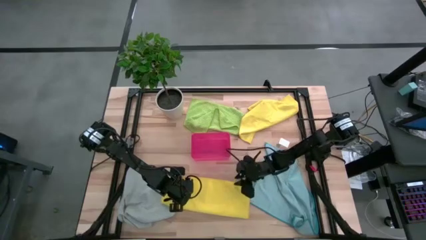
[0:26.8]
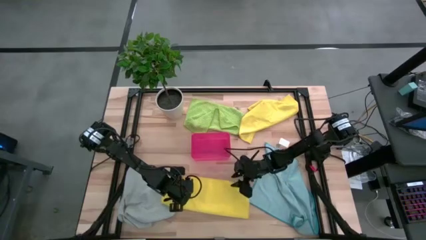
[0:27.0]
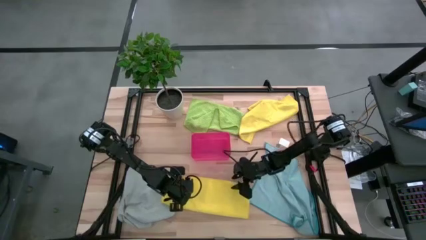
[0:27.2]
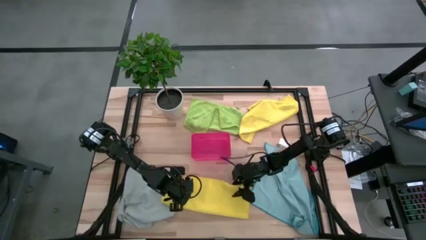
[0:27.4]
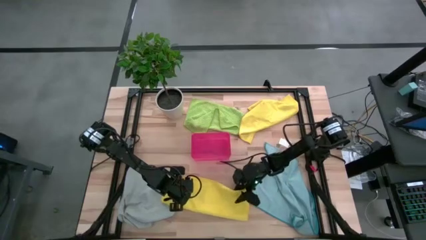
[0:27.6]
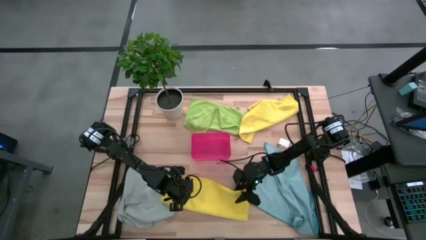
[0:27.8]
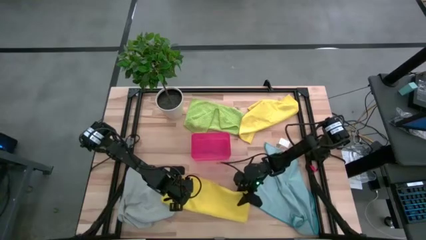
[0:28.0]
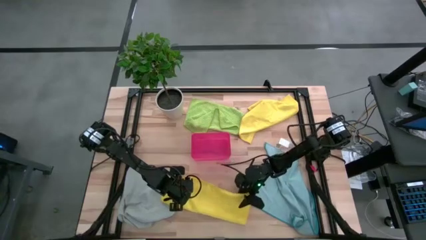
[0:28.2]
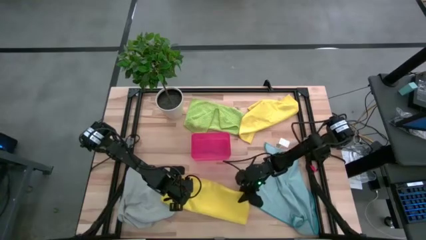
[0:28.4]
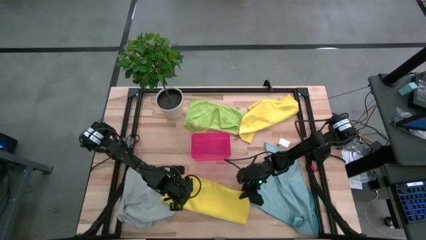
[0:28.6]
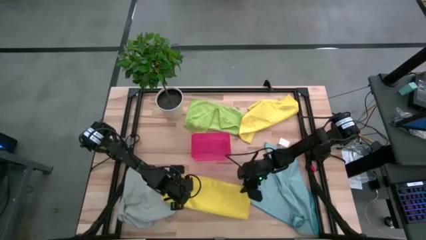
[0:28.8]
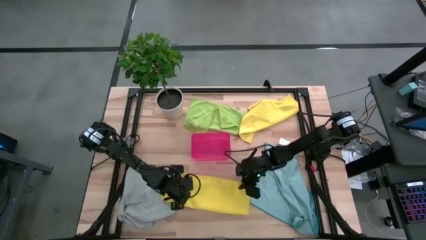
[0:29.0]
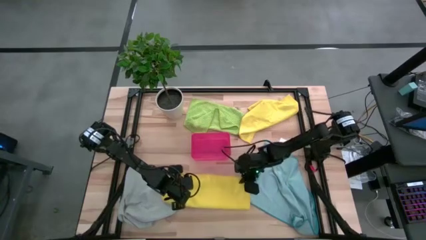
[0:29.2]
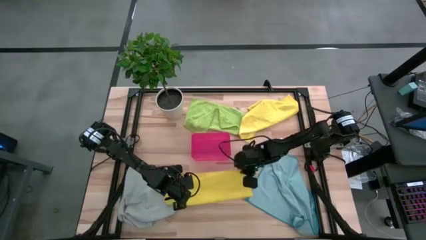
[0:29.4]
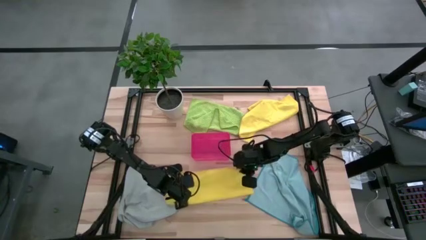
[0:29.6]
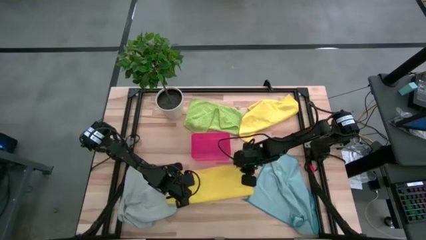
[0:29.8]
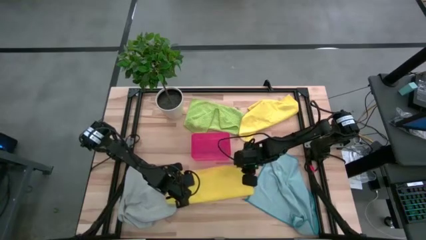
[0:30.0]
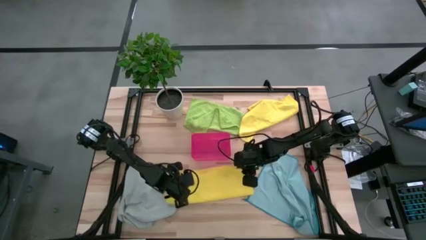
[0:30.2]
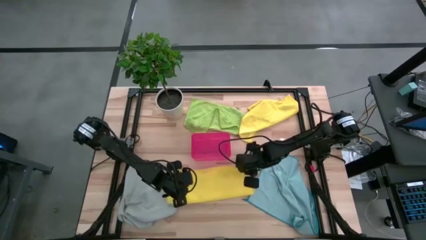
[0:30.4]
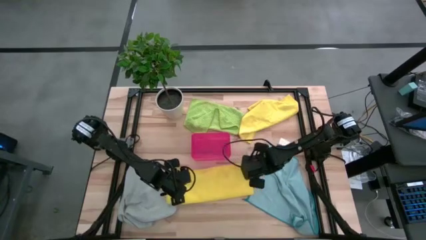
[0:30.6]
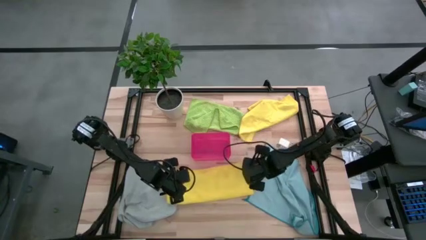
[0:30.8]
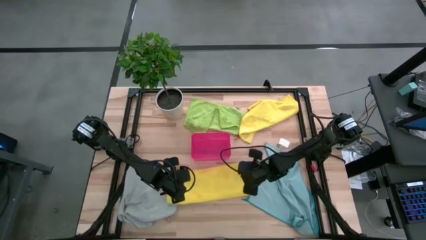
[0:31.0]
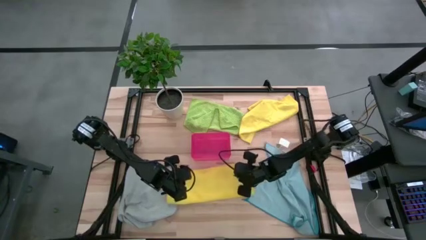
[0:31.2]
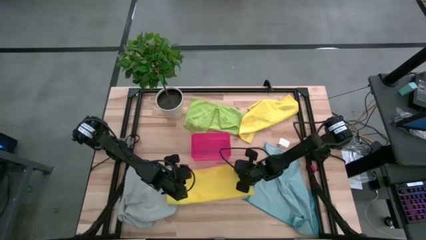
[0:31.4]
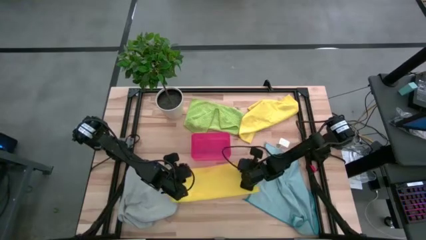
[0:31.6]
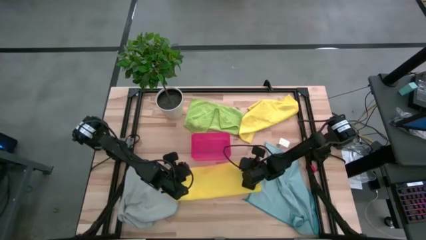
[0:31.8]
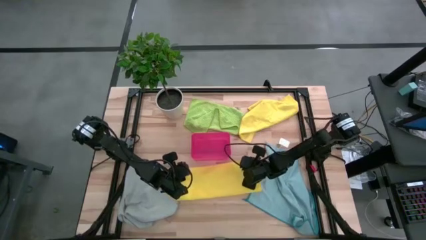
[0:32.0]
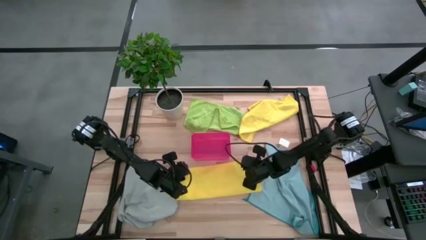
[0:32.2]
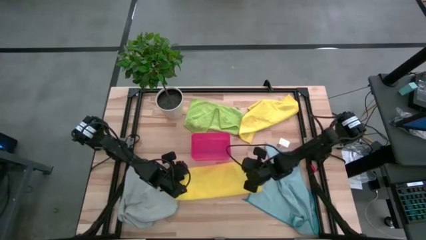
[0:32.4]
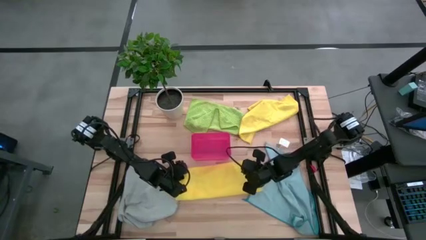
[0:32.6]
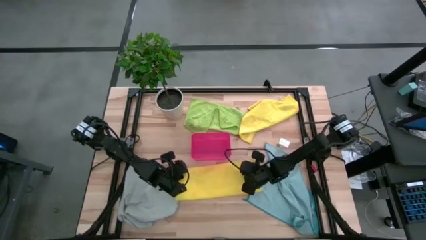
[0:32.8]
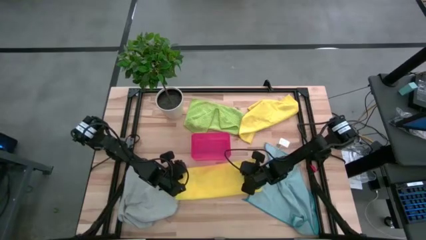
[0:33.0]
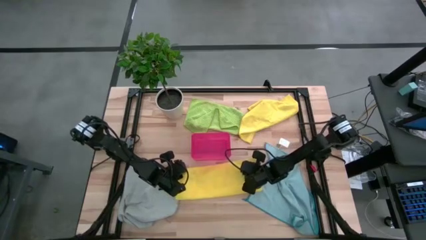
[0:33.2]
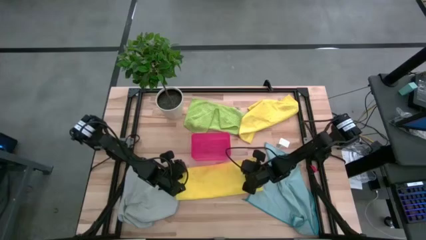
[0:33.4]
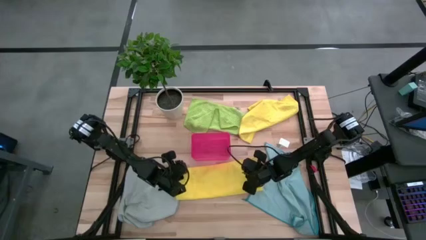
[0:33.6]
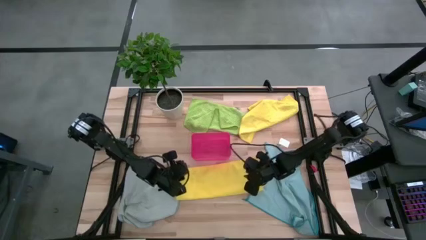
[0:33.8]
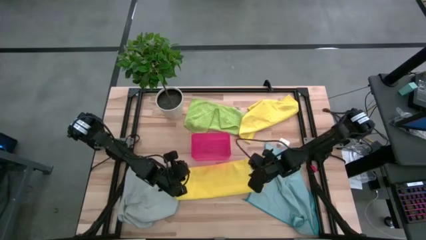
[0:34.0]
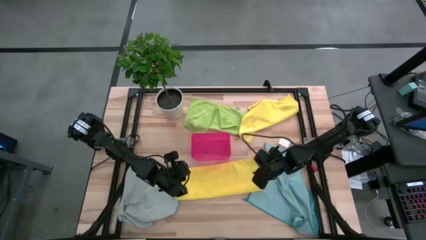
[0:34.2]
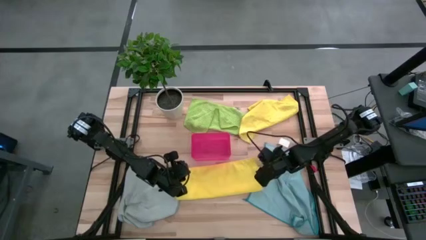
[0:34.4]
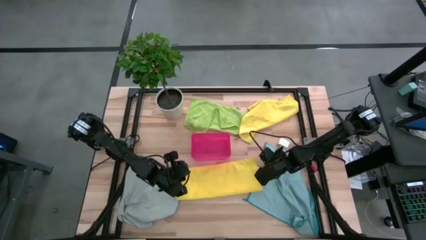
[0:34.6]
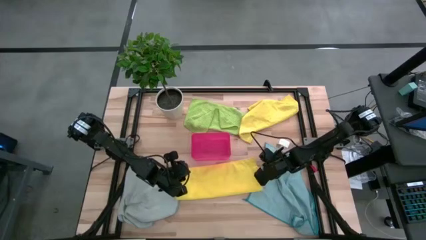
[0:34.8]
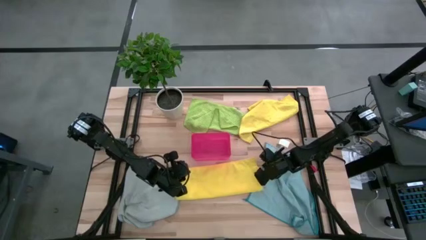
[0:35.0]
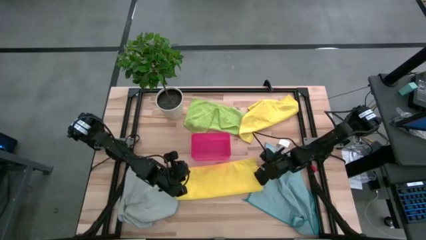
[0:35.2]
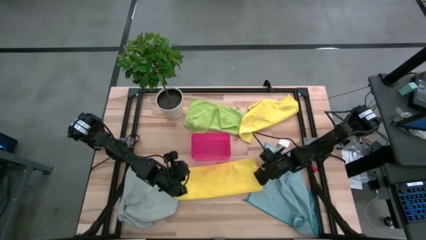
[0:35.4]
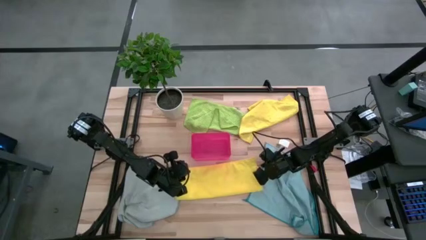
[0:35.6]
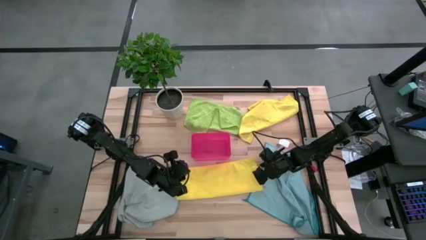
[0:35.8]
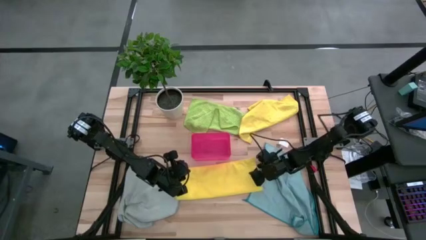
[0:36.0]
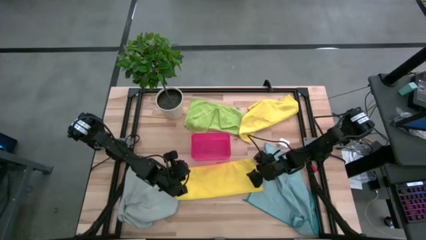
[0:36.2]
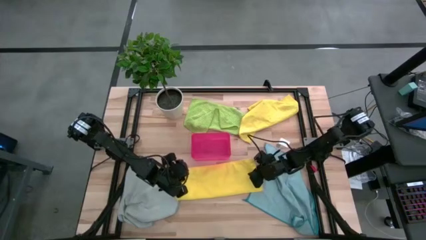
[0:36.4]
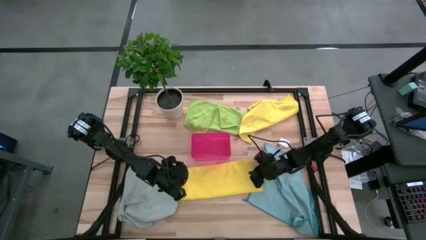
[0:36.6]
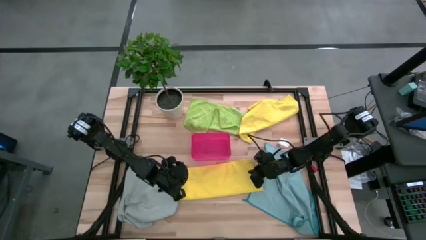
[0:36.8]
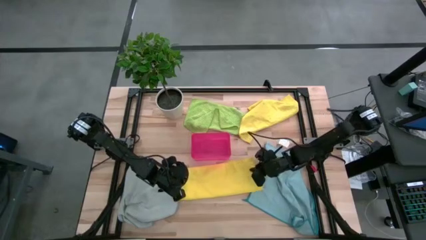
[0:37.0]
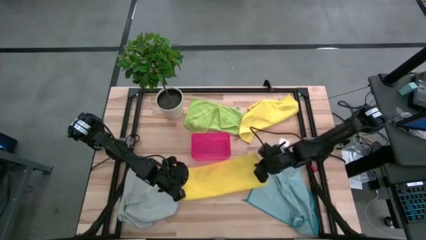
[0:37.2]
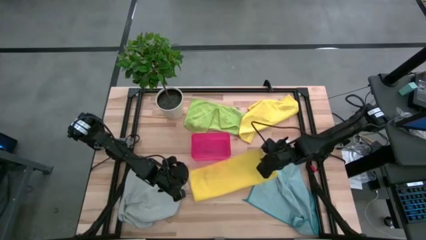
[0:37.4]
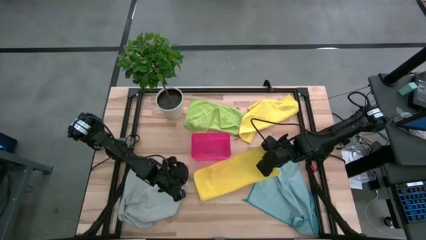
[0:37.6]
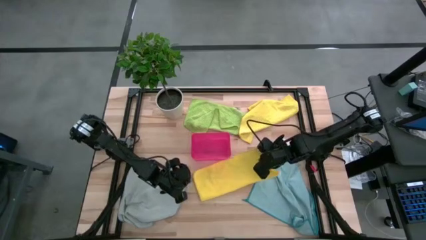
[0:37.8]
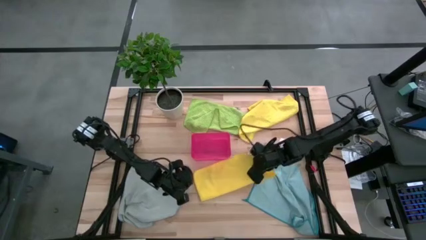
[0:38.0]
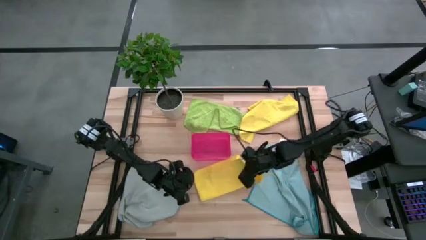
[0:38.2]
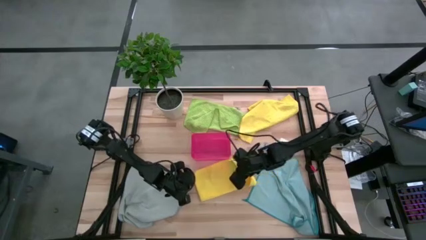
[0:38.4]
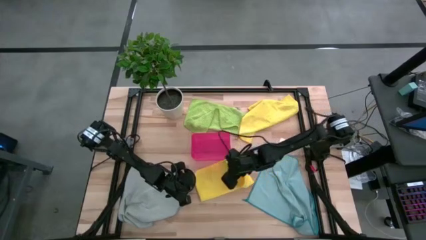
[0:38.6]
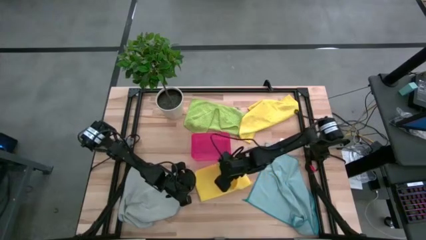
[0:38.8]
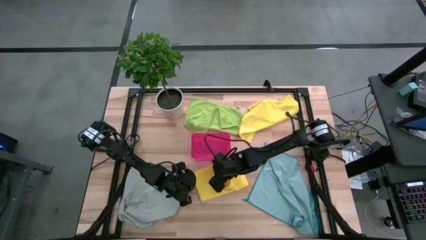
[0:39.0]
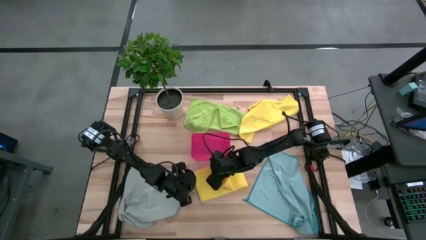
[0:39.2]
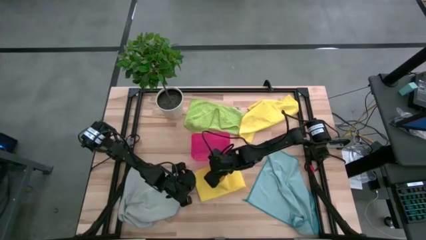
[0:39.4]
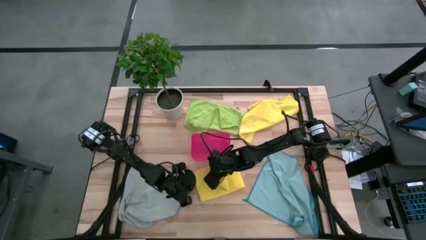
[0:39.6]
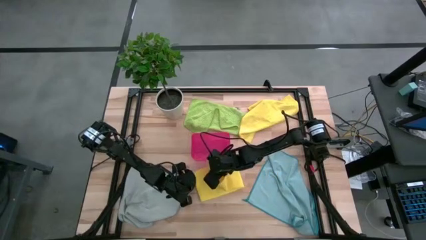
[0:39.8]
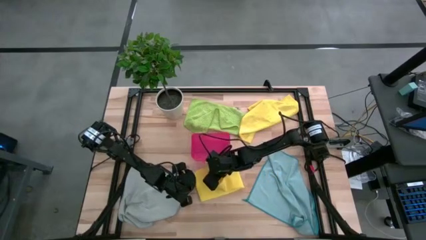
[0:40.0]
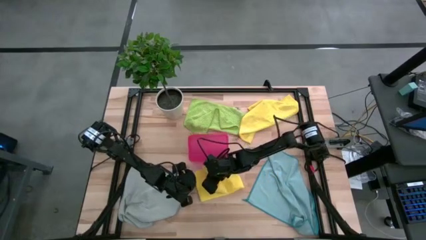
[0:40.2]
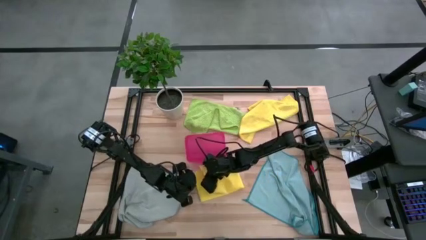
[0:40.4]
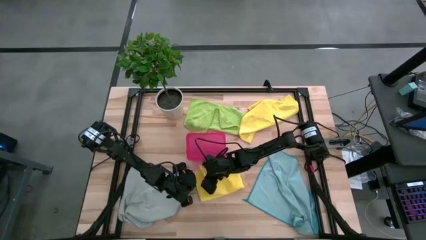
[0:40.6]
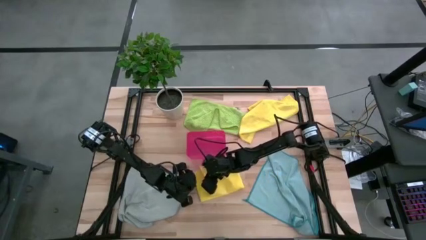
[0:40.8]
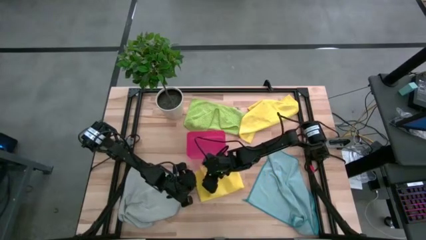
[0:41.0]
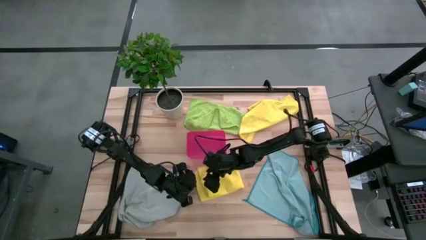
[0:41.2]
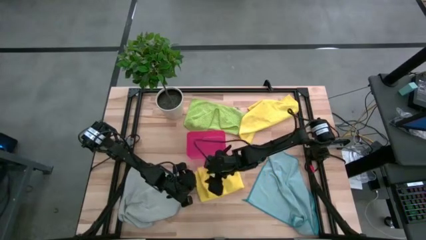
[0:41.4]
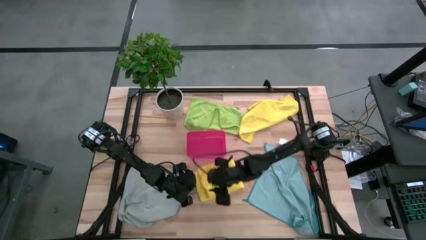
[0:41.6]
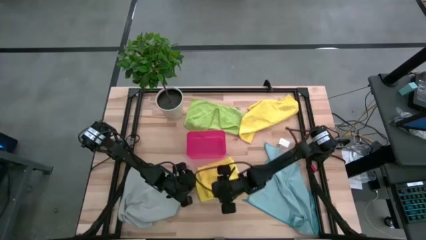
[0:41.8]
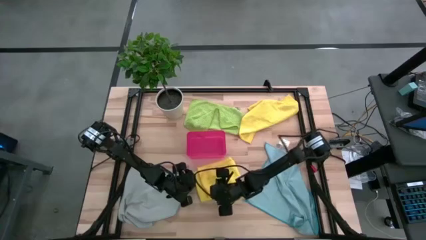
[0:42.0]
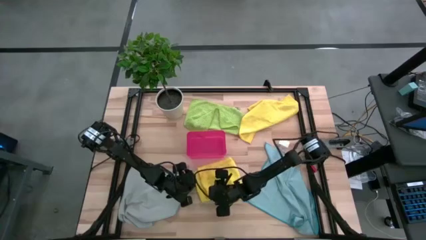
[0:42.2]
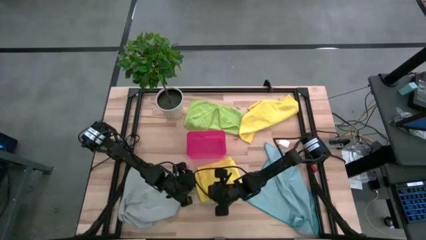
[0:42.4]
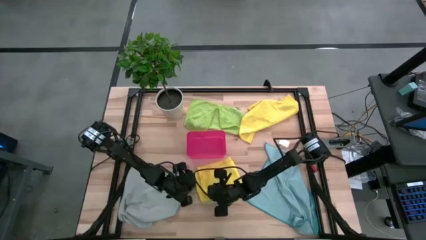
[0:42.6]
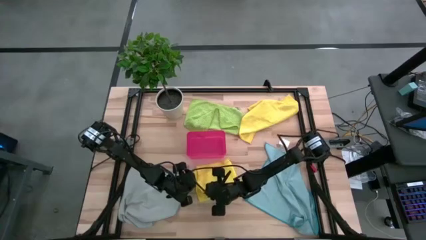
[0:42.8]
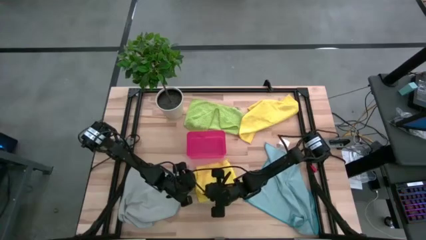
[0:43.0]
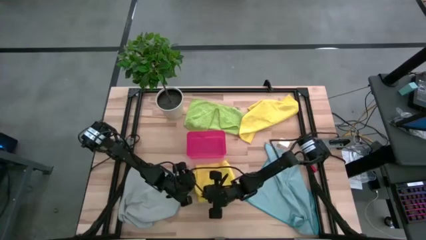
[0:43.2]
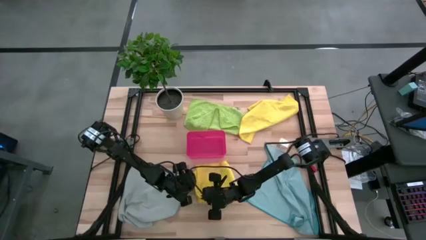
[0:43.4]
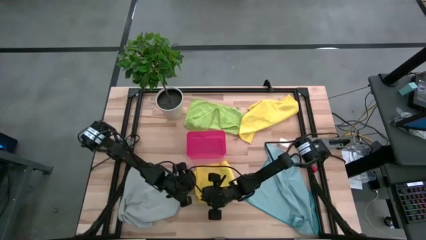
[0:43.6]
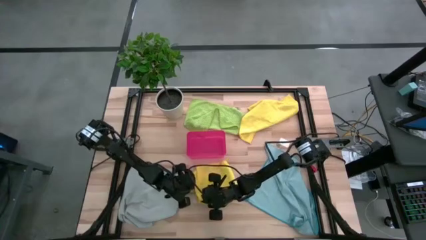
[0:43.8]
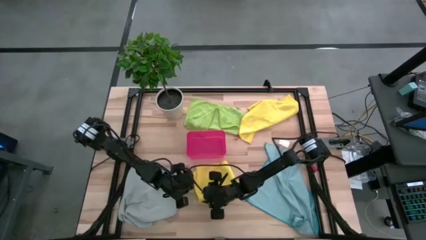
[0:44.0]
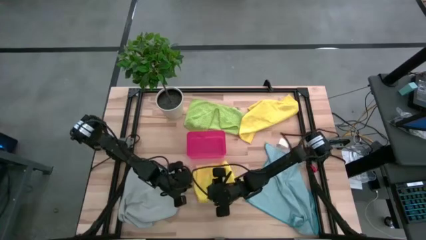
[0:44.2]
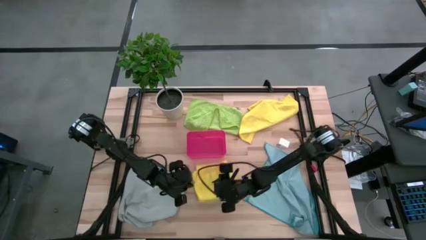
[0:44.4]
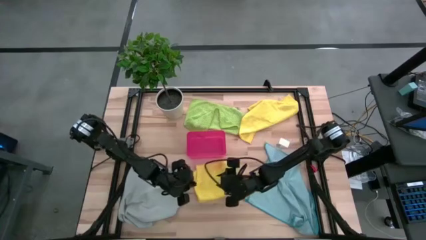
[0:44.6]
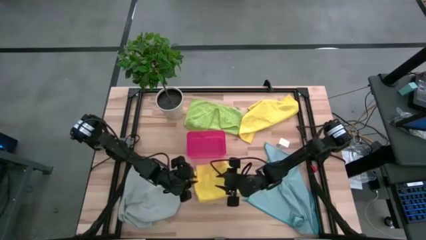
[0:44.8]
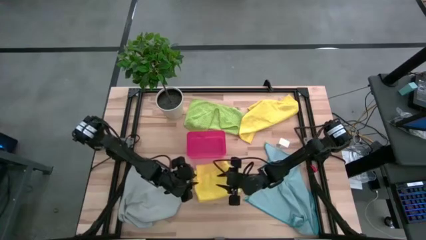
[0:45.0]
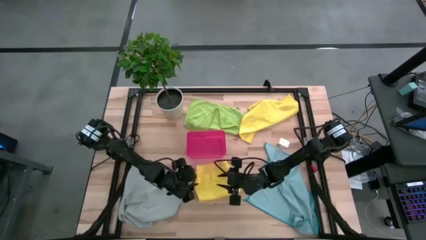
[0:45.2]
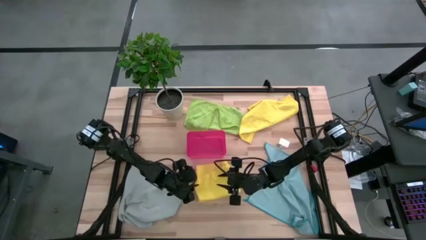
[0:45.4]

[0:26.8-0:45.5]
Task: Fold microfiber towels
Fold the bottom yellow microfiber cloth
